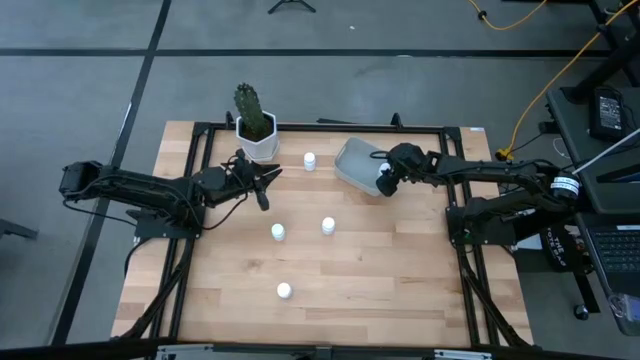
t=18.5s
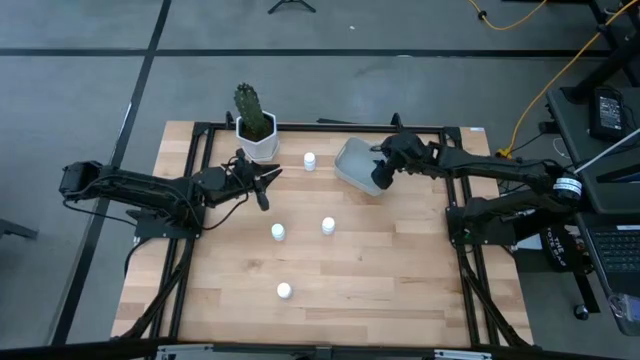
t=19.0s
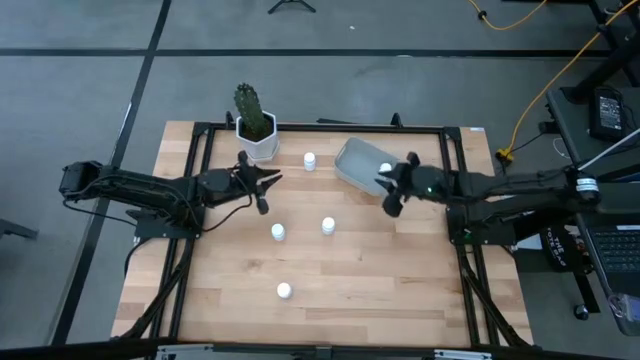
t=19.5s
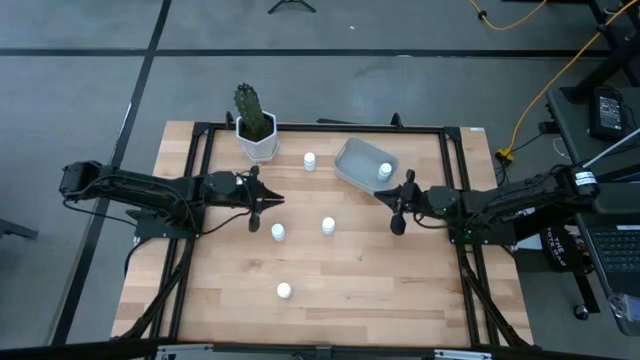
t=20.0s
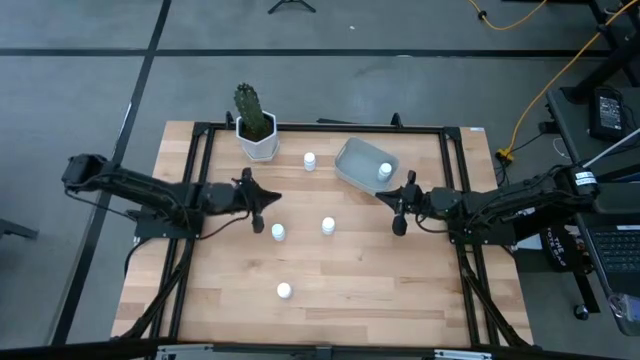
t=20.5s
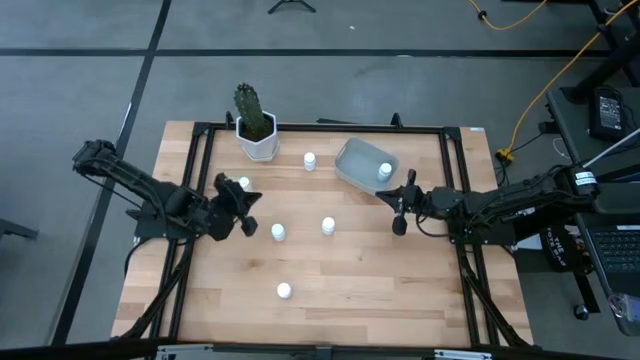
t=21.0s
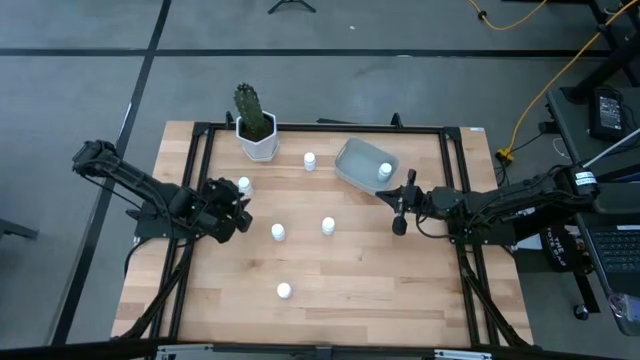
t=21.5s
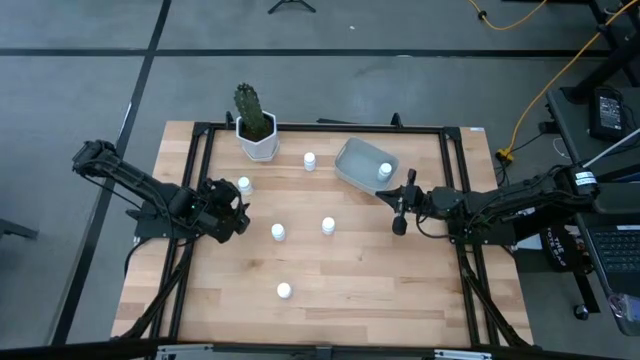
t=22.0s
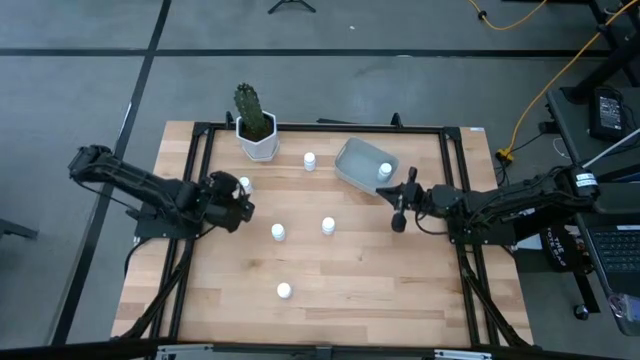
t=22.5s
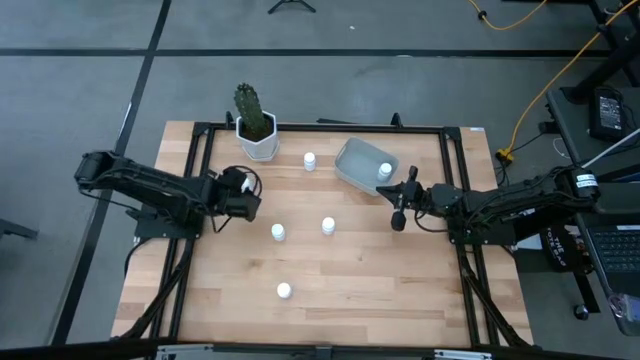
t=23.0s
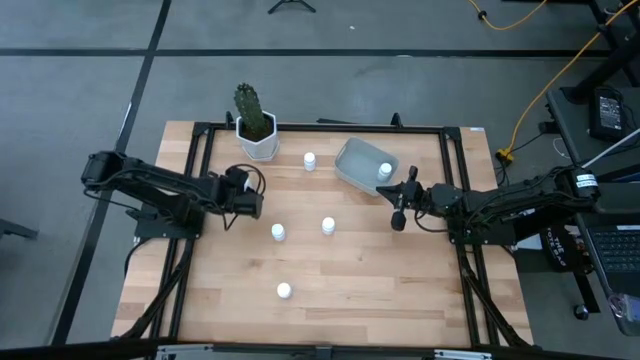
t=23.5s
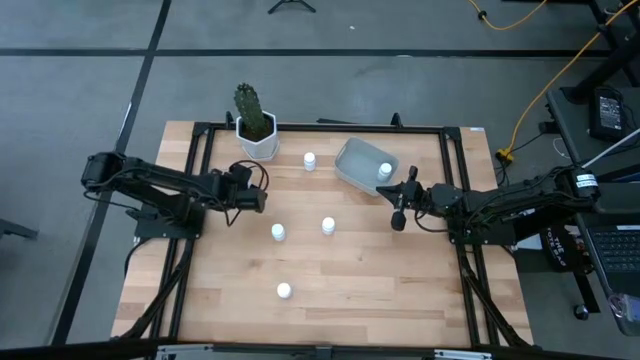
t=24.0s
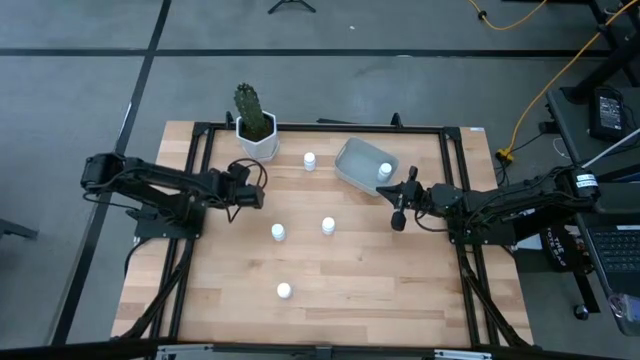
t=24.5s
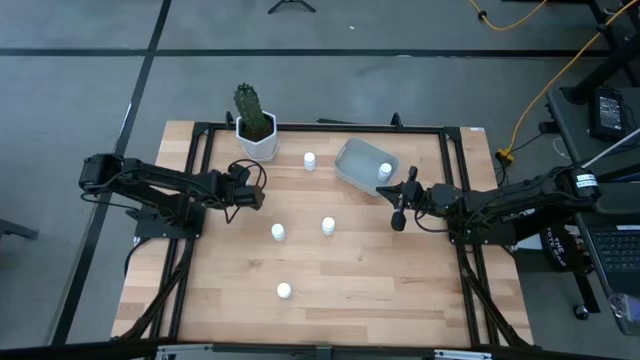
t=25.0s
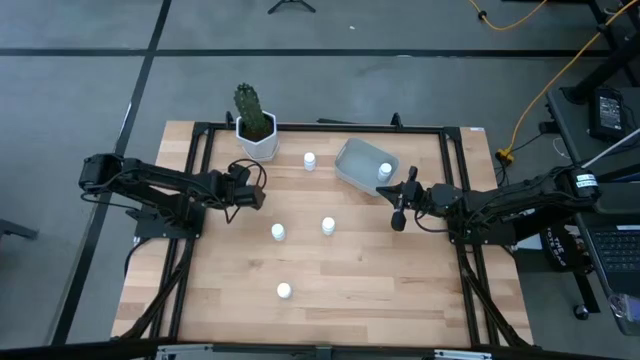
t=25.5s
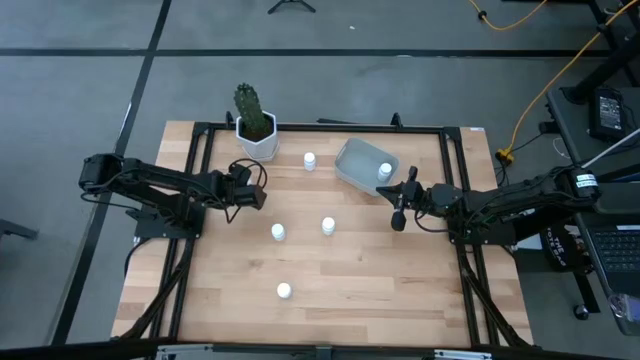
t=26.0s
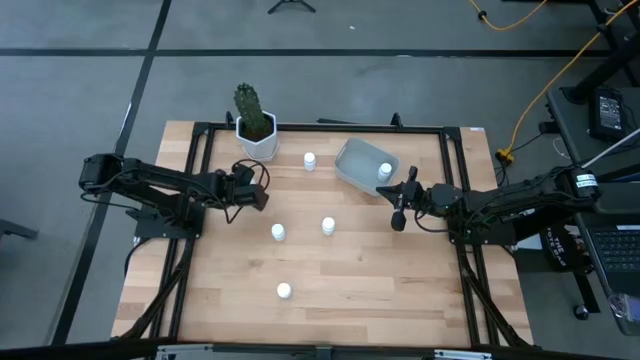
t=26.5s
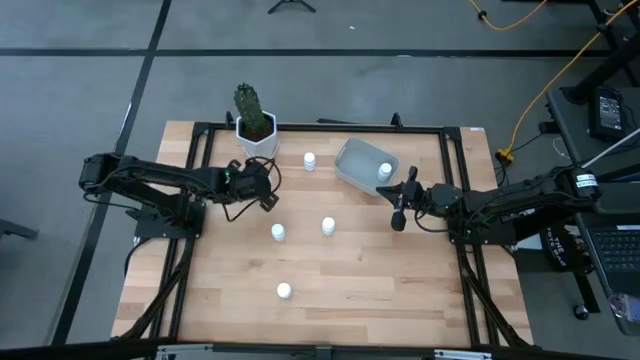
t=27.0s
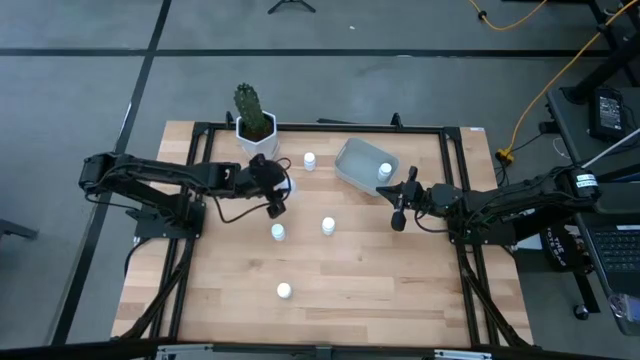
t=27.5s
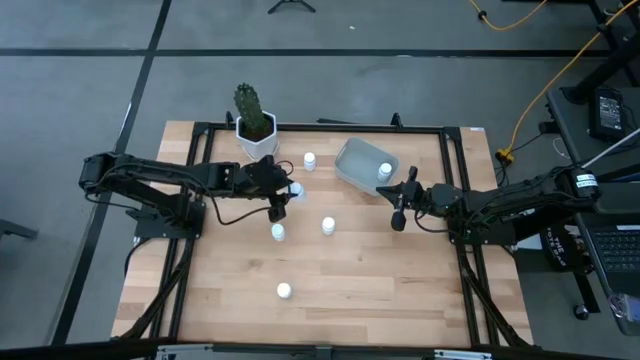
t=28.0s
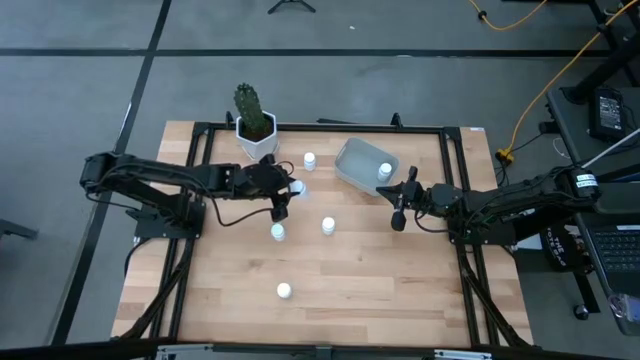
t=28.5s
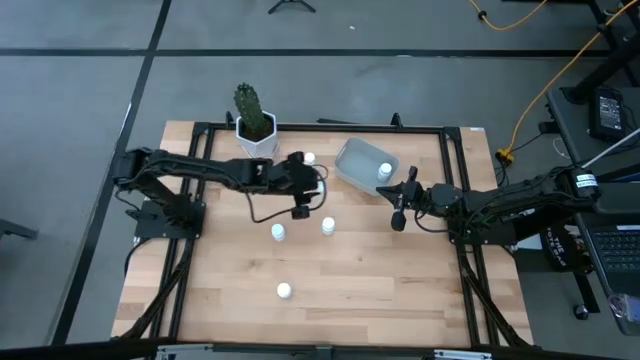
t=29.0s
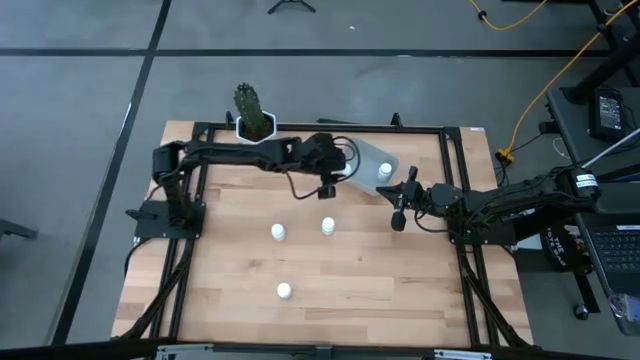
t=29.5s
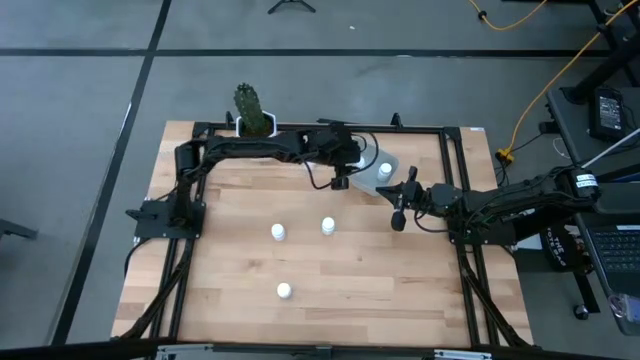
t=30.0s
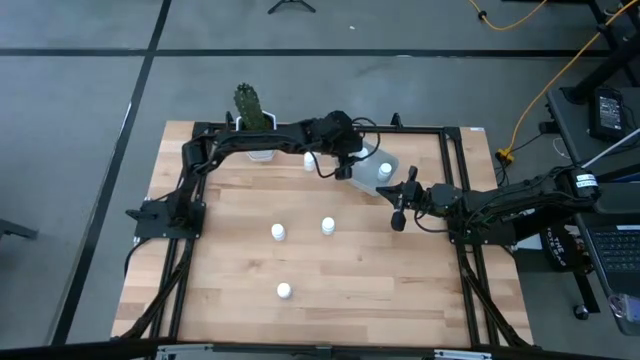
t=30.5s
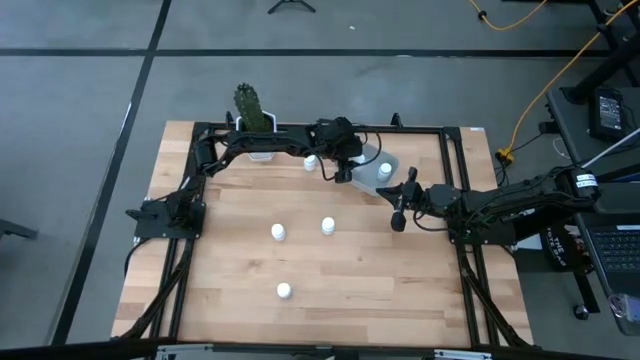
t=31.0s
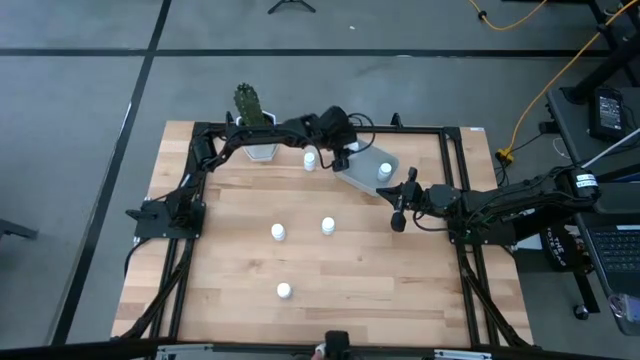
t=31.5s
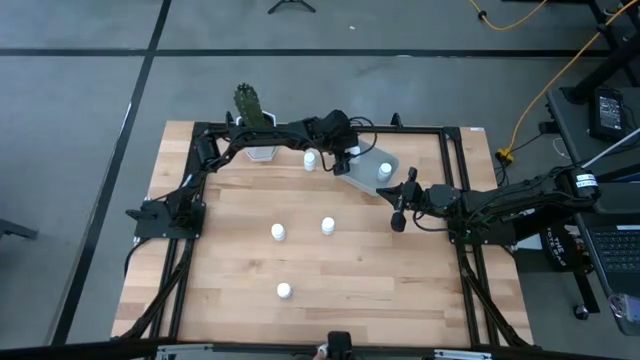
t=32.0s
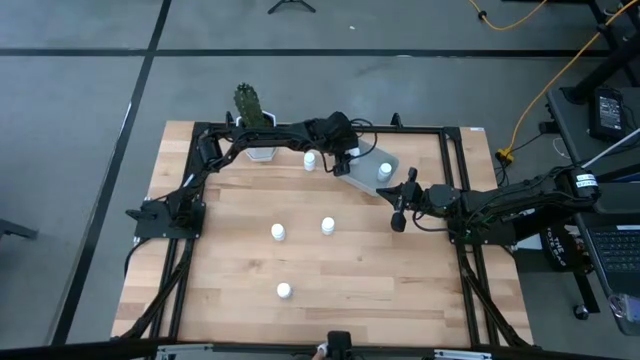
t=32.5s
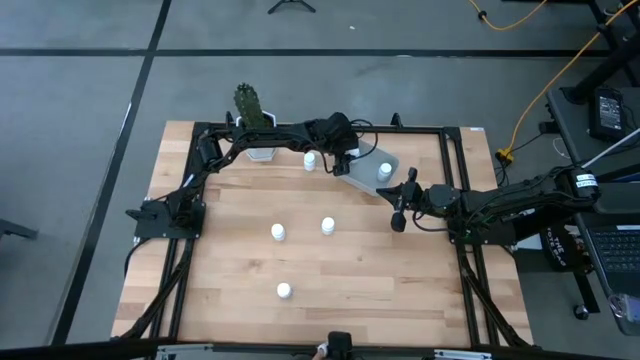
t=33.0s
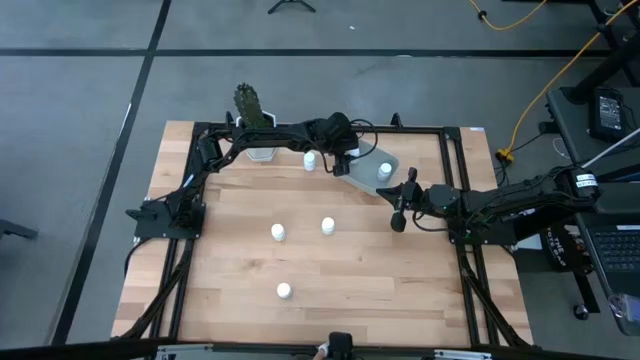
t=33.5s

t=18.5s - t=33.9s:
Task: Pick and place pill bottles into a basket
Put the white pill bottle into the gray bin

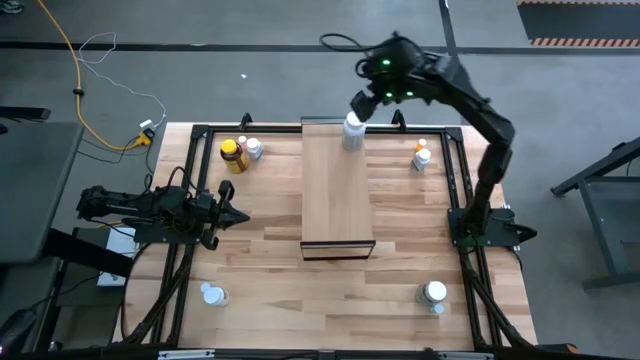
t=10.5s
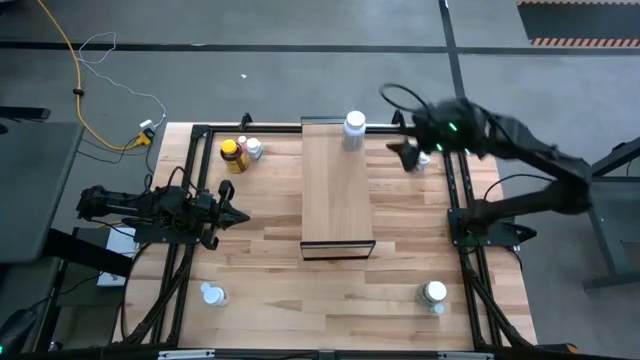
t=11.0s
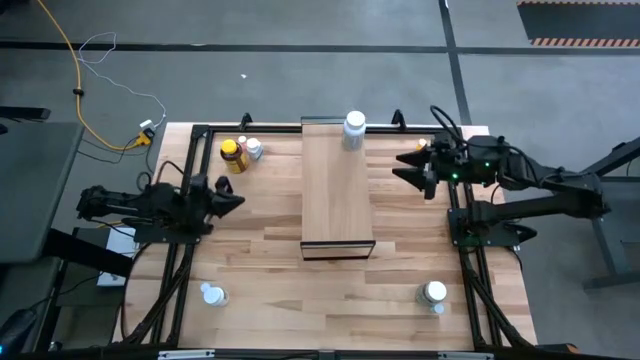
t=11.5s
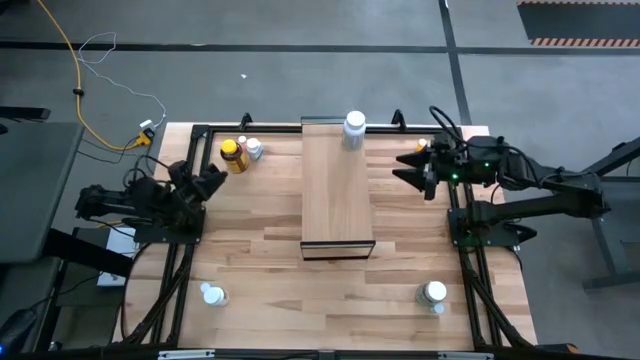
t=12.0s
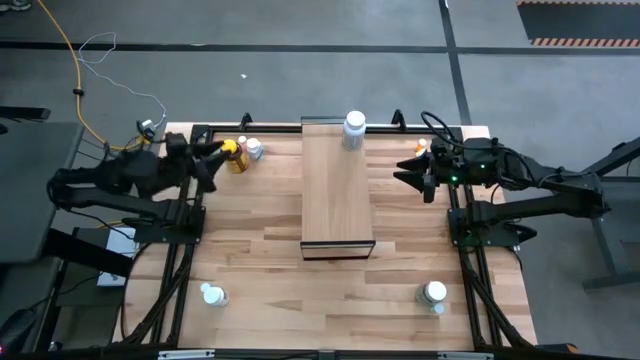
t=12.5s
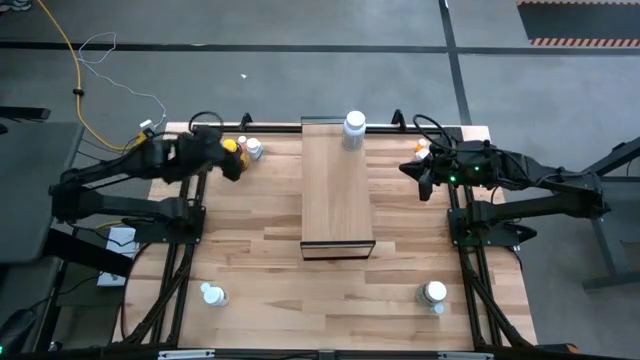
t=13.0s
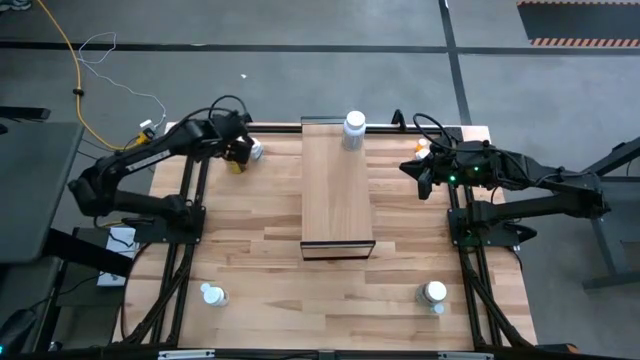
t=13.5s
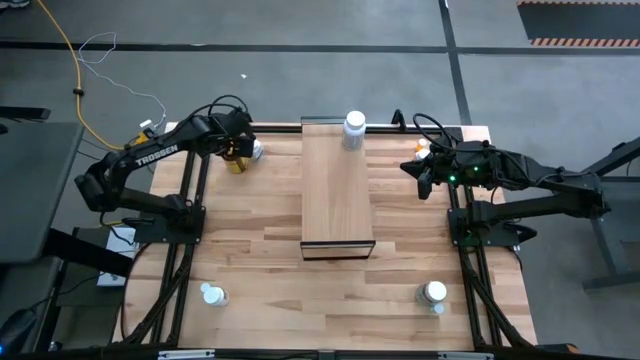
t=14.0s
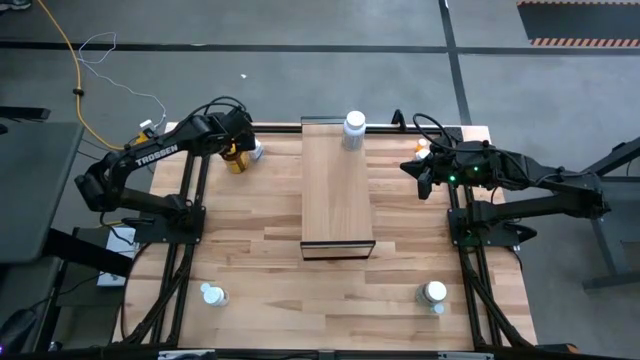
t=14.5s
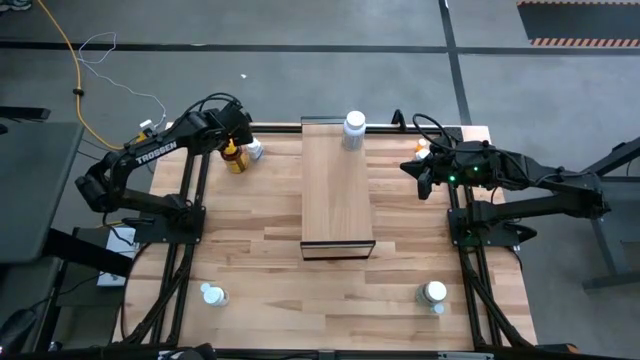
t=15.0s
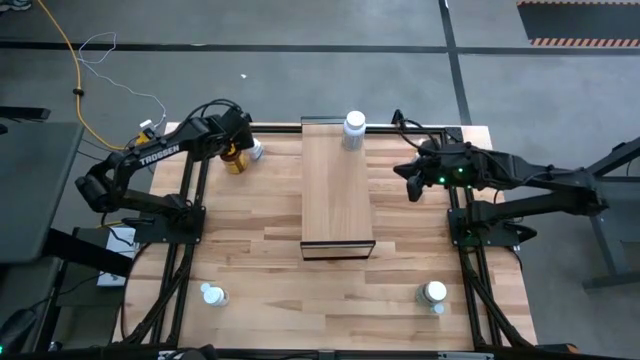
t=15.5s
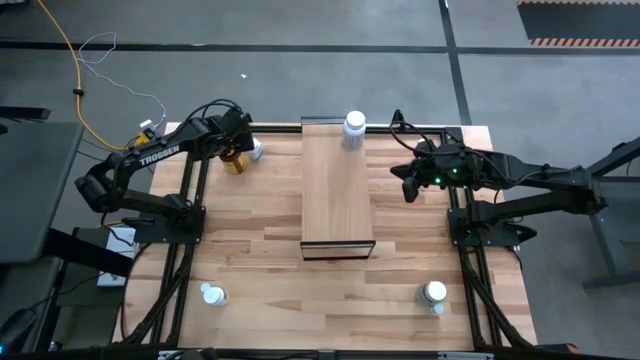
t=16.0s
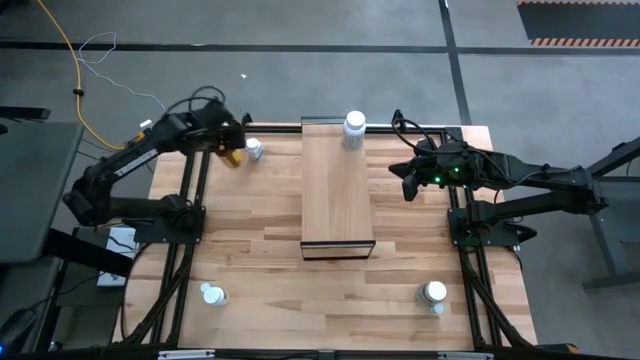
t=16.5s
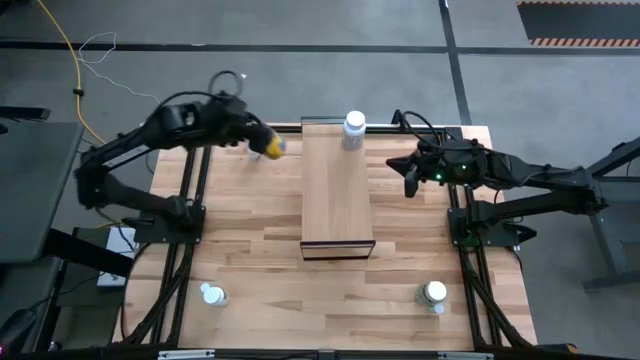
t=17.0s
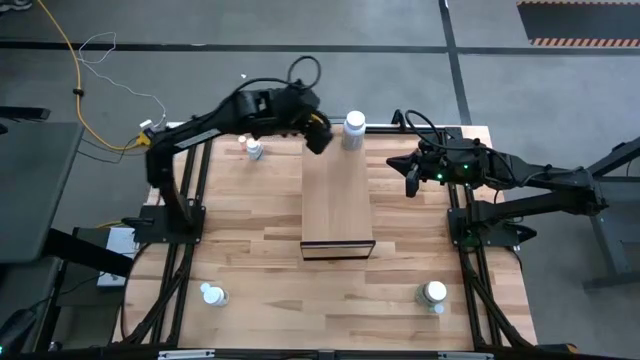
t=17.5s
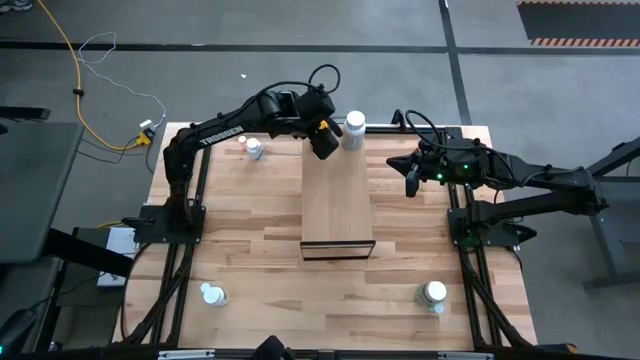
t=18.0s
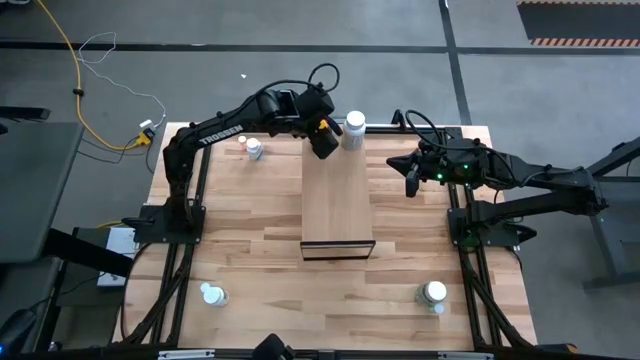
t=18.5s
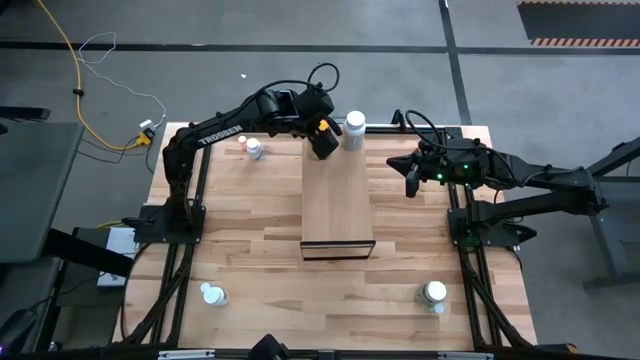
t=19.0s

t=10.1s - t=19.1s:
Task: Pick and place medicine bottles onto shelf by color
Put the yellow pill bottle on the shelf
